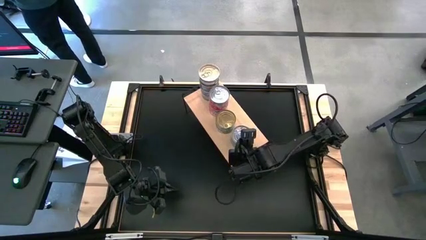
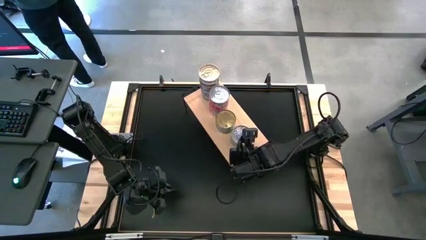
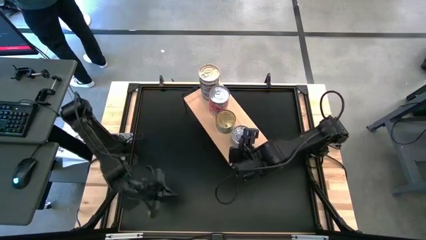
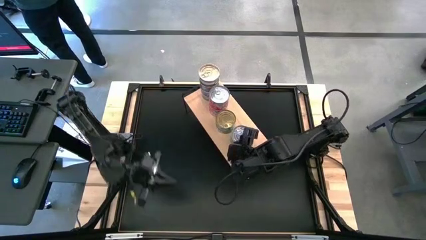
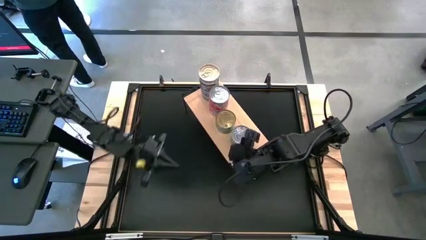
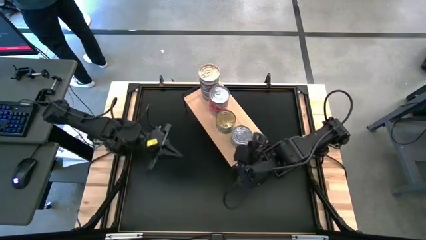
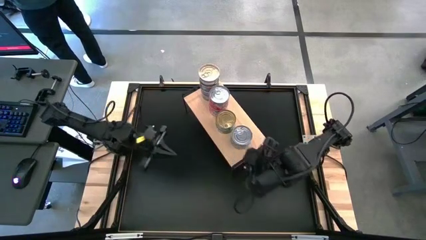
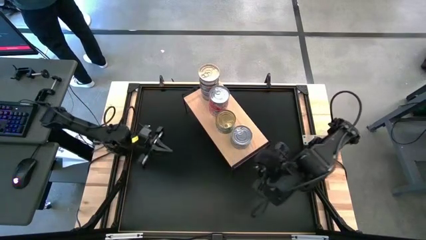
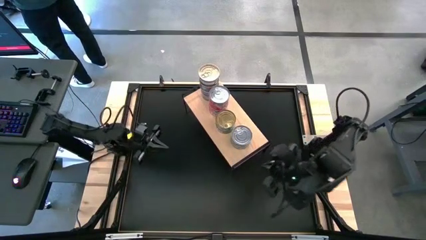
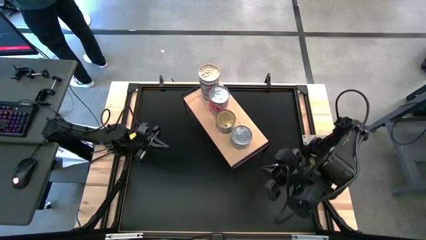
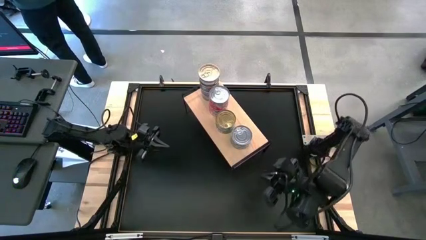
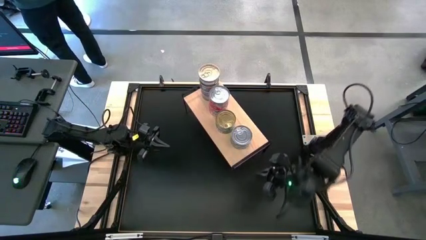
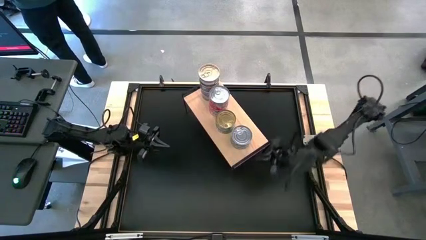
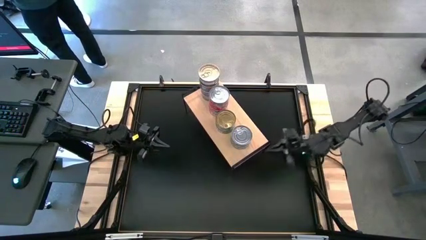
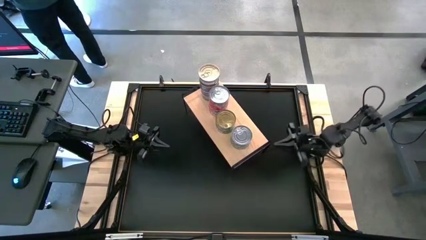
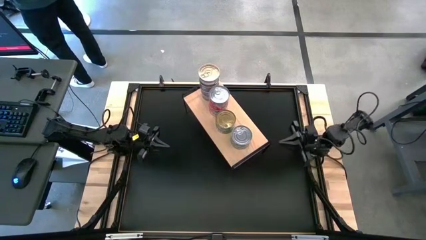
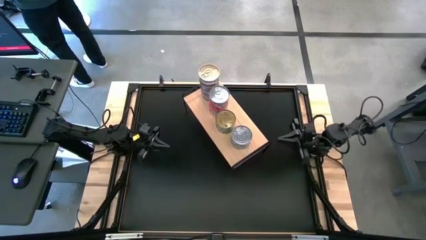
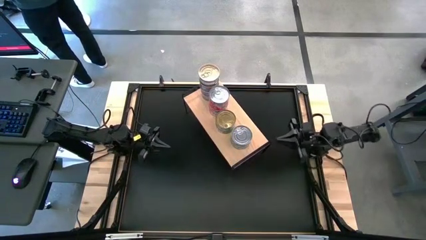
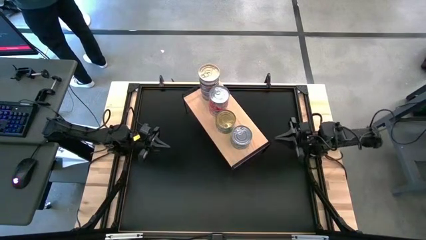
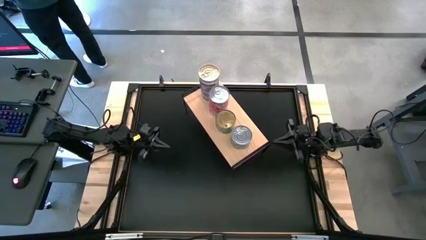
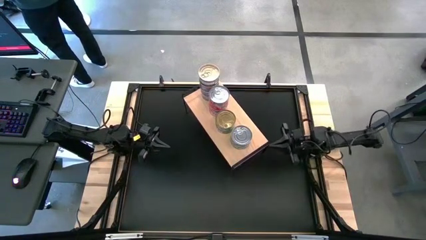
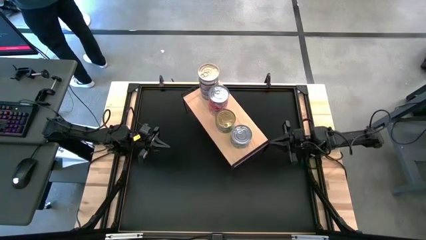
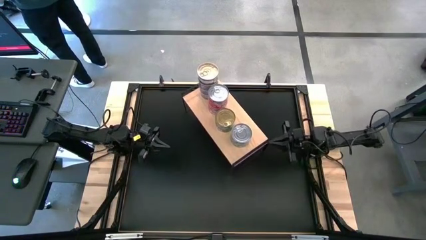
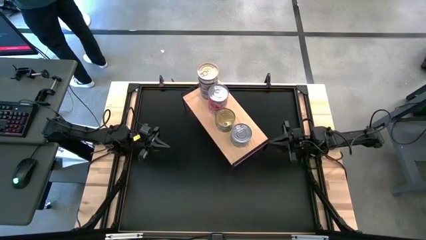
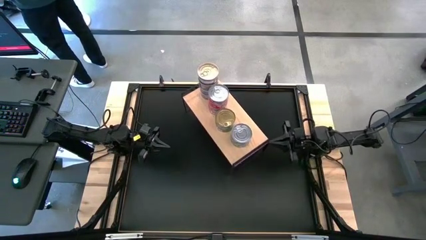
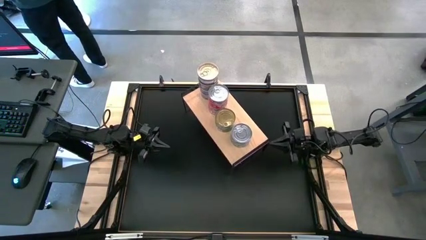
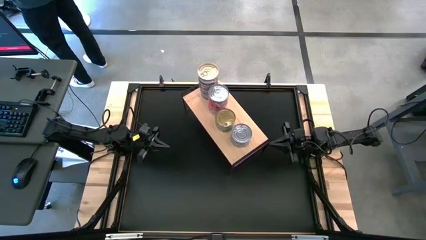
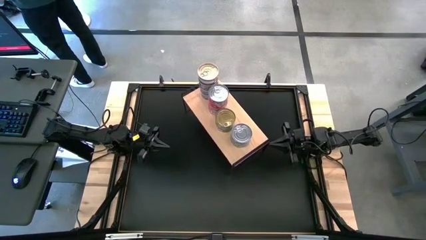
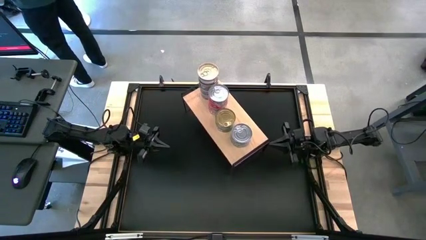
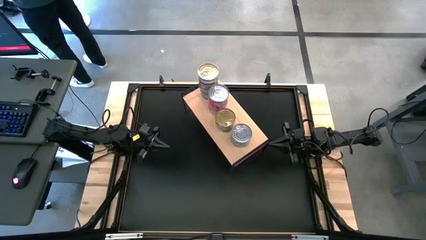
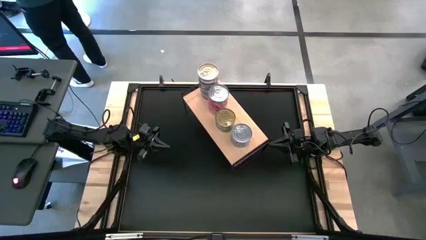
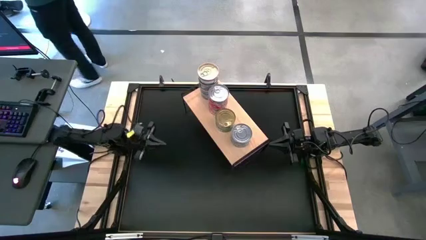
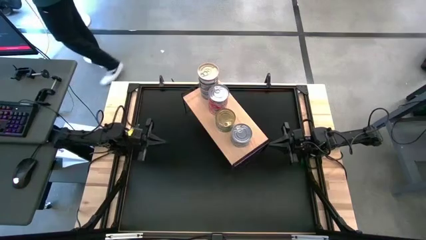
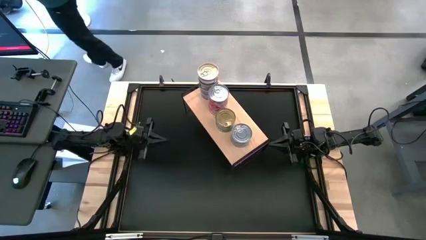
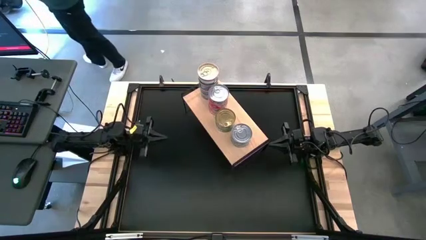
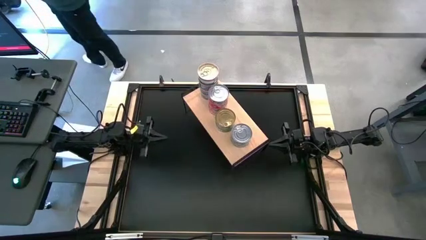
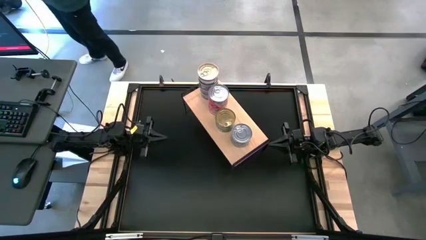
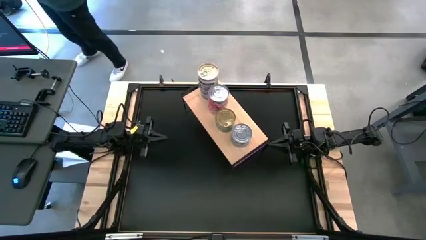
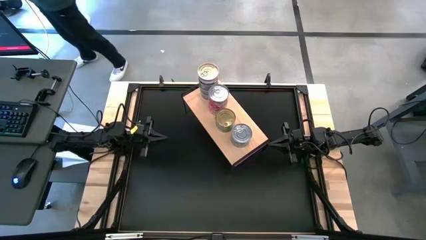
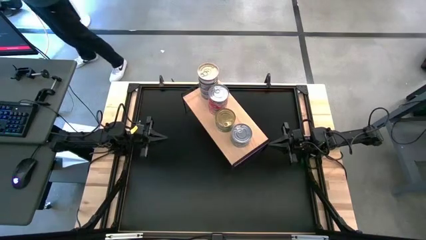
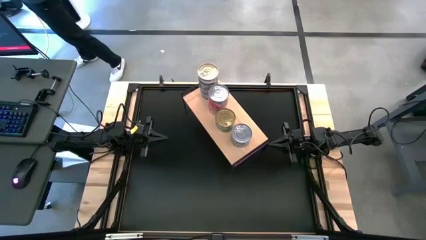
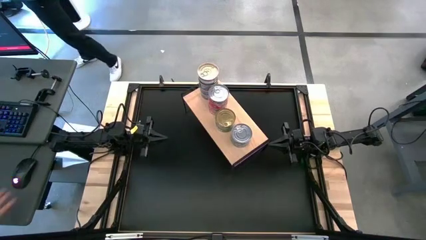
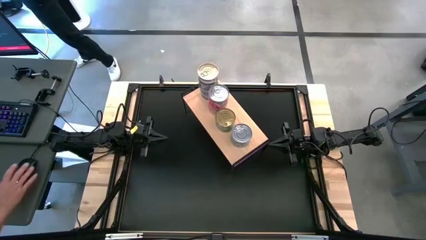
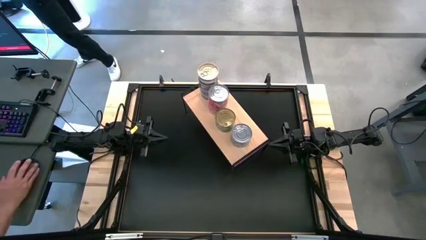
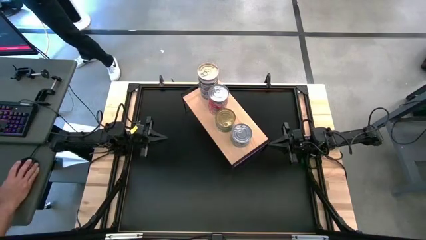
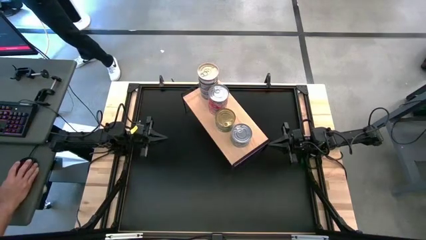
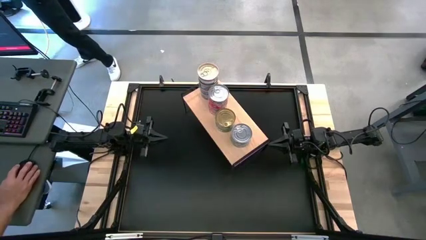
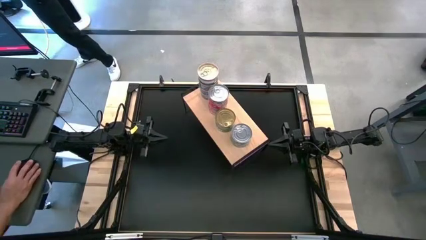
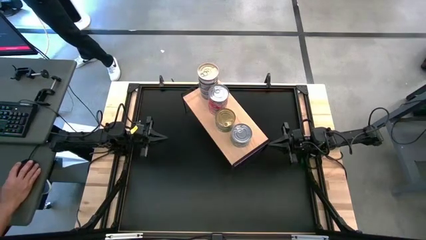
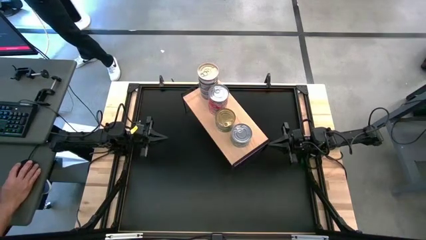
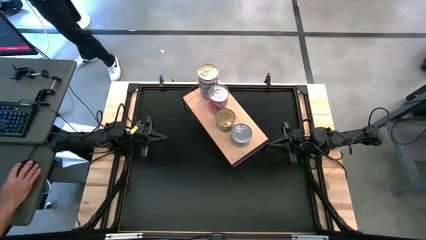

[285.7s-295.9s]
Task: Stack canned seafood by type on shelf
Return to Home Position
